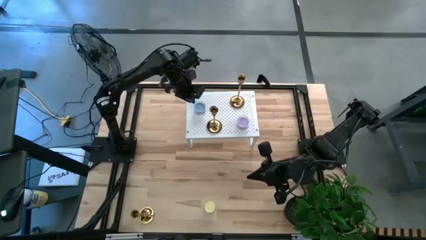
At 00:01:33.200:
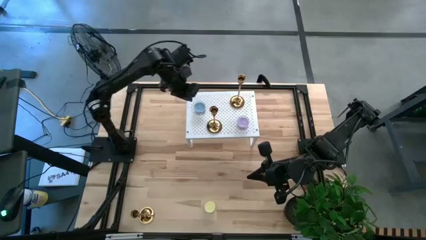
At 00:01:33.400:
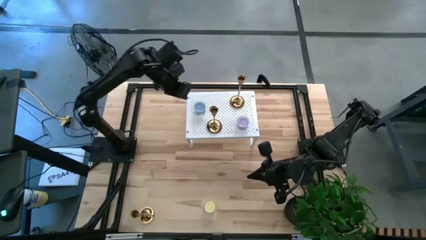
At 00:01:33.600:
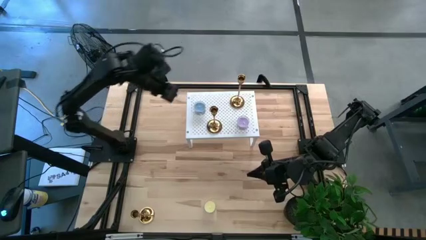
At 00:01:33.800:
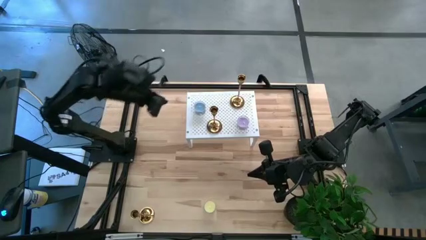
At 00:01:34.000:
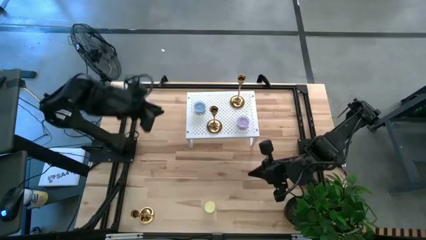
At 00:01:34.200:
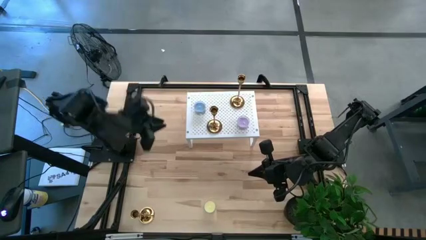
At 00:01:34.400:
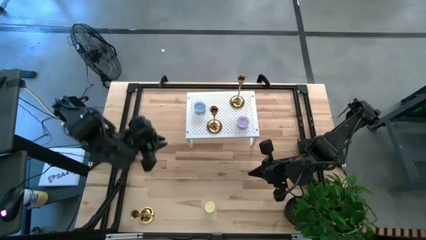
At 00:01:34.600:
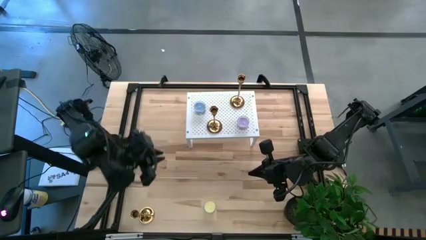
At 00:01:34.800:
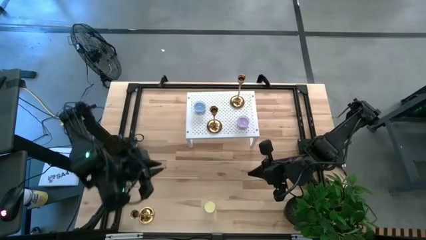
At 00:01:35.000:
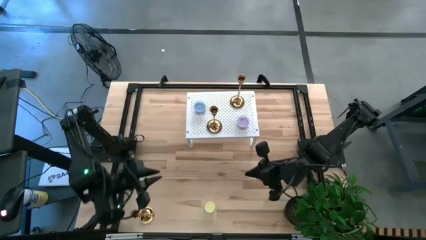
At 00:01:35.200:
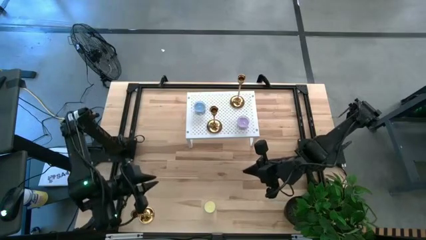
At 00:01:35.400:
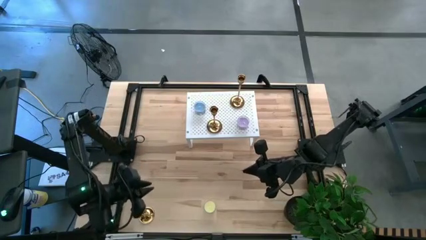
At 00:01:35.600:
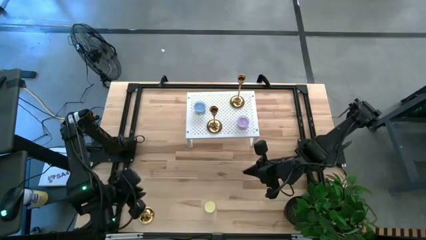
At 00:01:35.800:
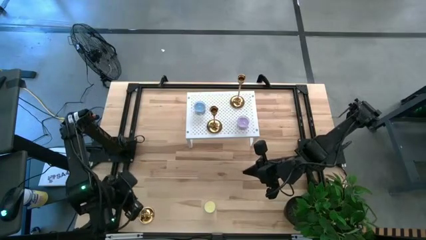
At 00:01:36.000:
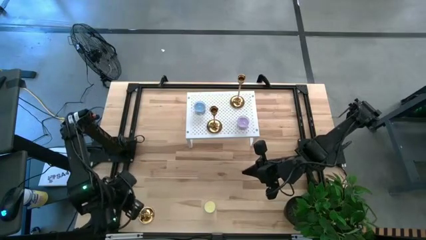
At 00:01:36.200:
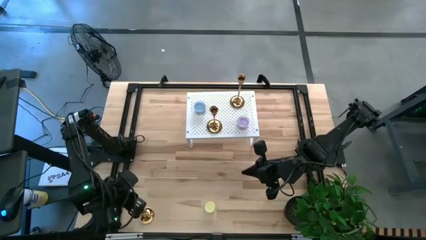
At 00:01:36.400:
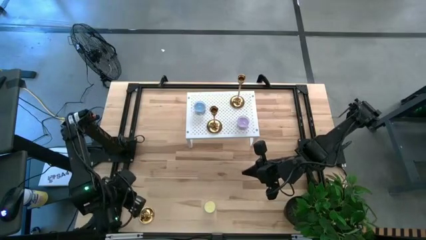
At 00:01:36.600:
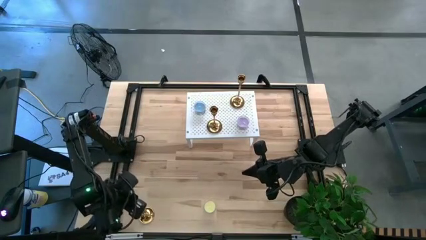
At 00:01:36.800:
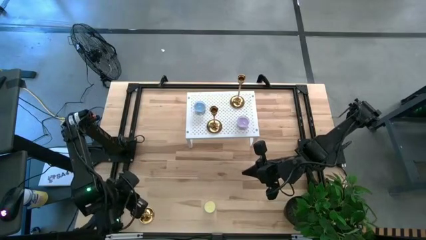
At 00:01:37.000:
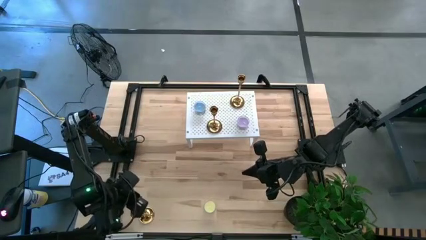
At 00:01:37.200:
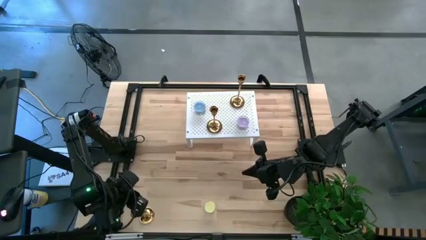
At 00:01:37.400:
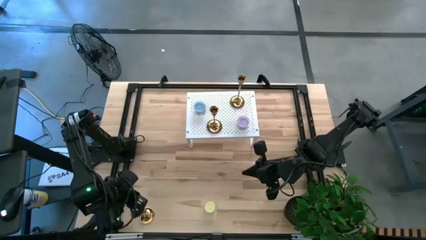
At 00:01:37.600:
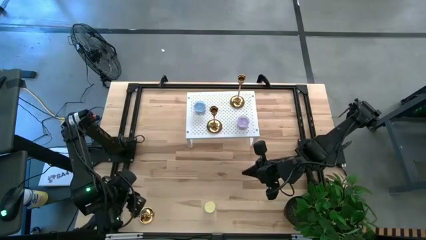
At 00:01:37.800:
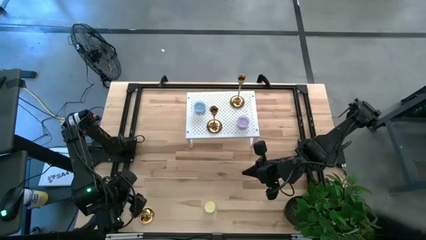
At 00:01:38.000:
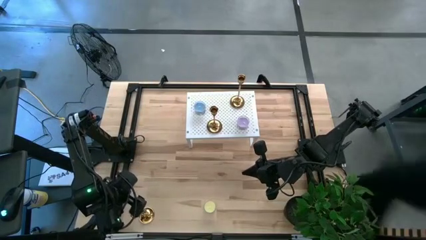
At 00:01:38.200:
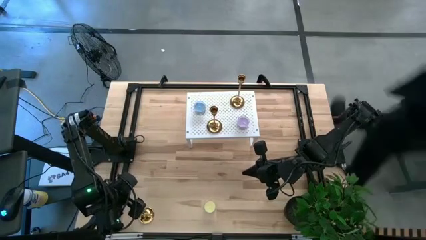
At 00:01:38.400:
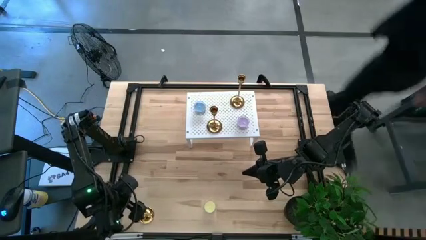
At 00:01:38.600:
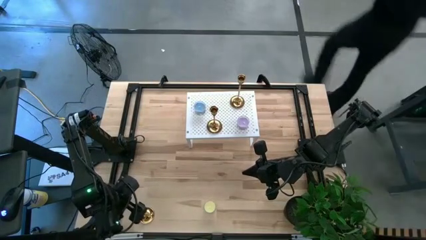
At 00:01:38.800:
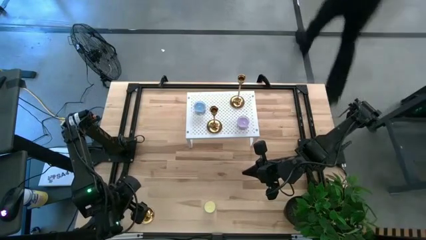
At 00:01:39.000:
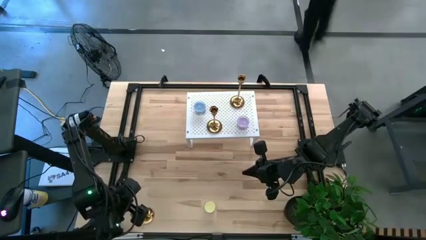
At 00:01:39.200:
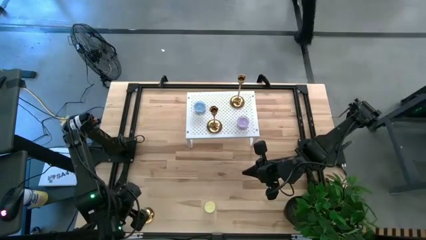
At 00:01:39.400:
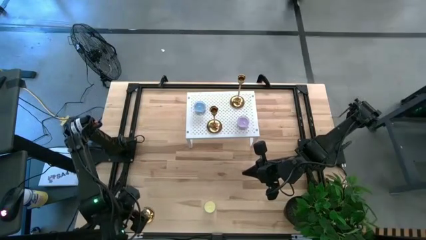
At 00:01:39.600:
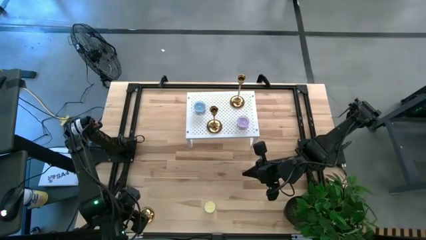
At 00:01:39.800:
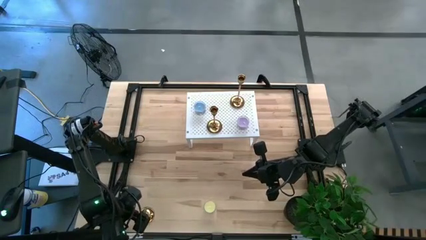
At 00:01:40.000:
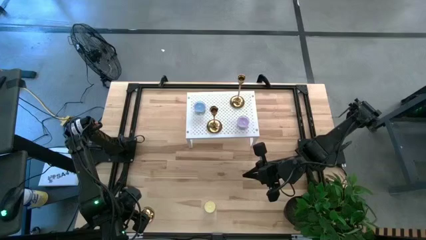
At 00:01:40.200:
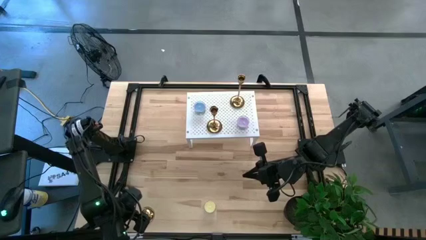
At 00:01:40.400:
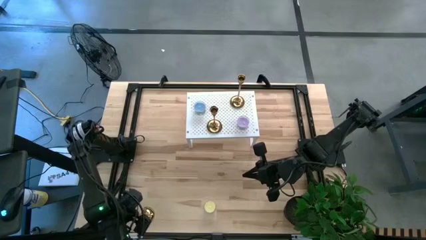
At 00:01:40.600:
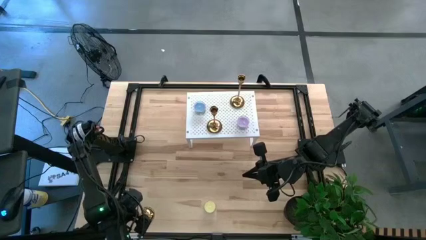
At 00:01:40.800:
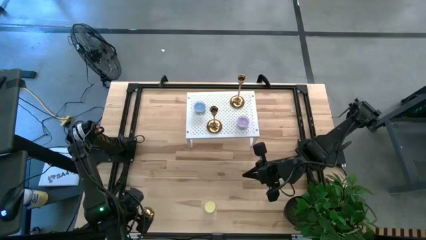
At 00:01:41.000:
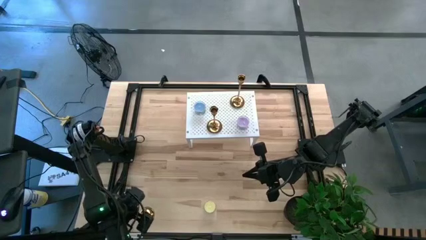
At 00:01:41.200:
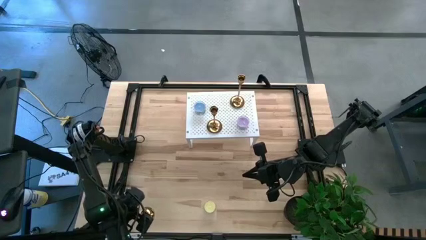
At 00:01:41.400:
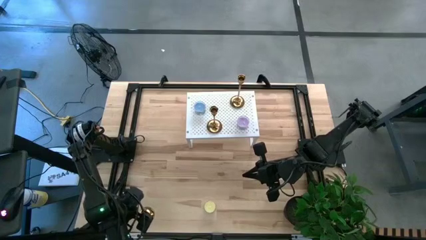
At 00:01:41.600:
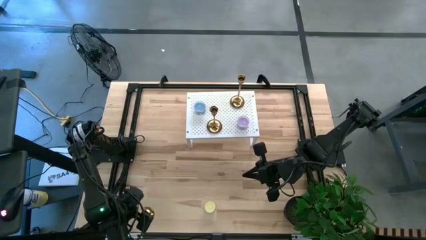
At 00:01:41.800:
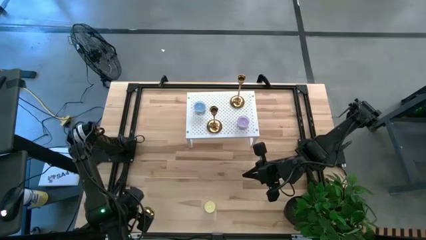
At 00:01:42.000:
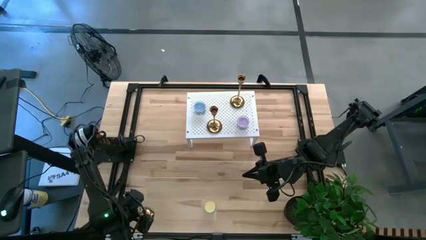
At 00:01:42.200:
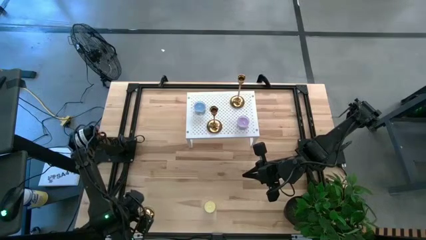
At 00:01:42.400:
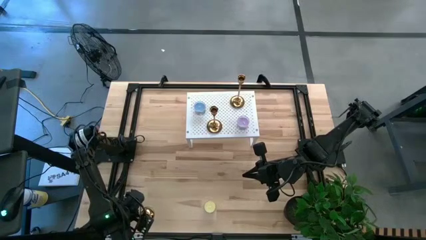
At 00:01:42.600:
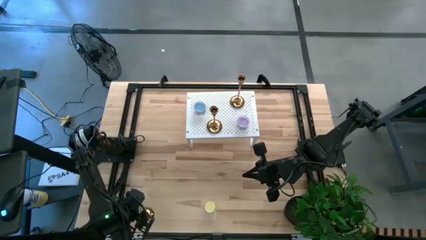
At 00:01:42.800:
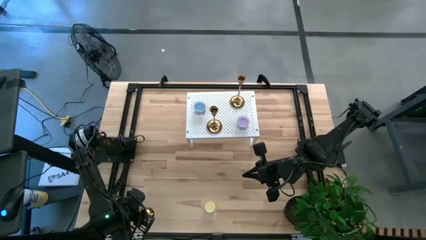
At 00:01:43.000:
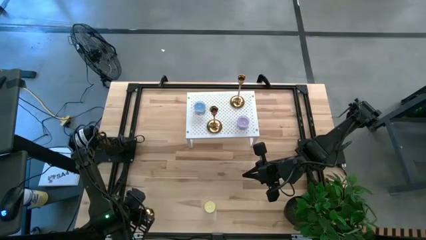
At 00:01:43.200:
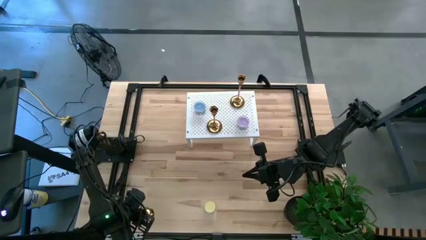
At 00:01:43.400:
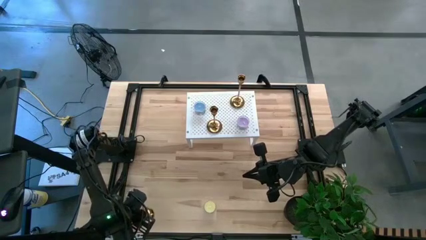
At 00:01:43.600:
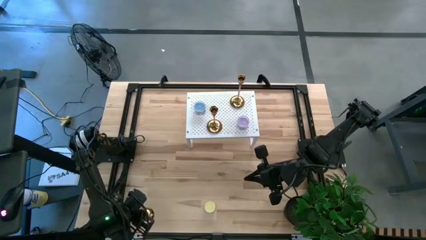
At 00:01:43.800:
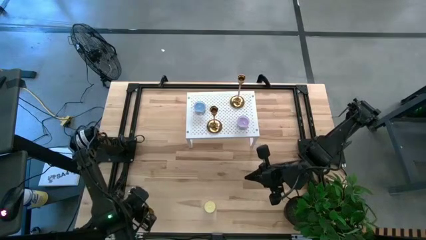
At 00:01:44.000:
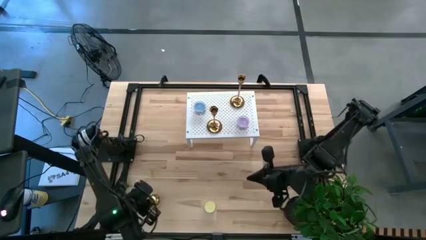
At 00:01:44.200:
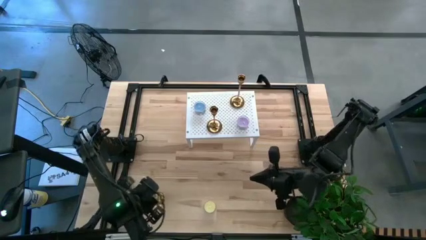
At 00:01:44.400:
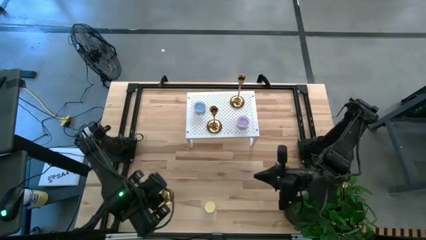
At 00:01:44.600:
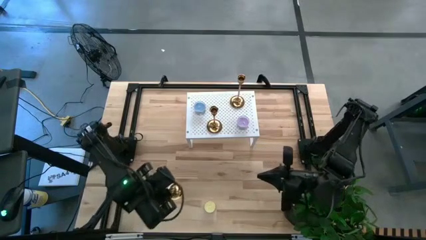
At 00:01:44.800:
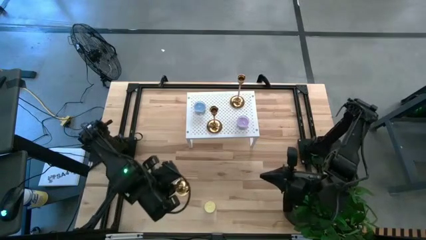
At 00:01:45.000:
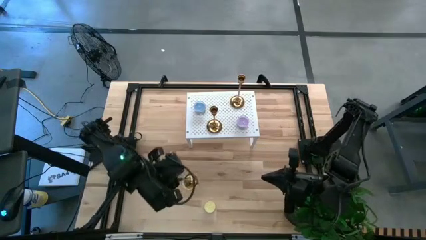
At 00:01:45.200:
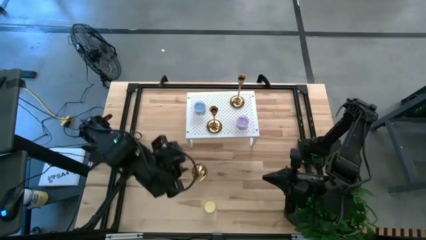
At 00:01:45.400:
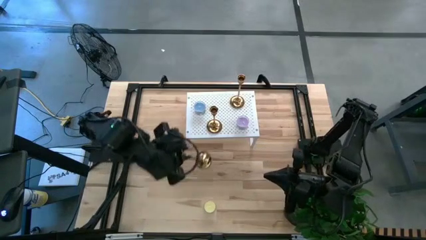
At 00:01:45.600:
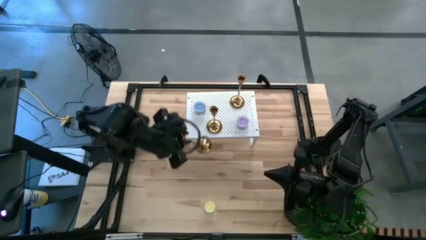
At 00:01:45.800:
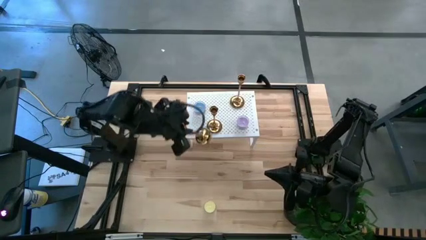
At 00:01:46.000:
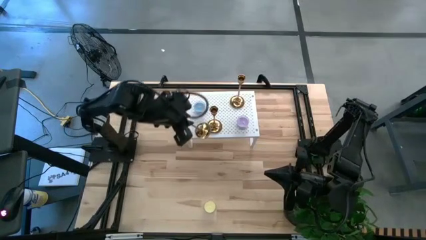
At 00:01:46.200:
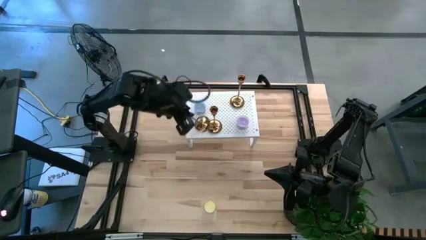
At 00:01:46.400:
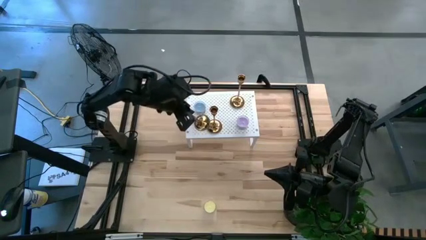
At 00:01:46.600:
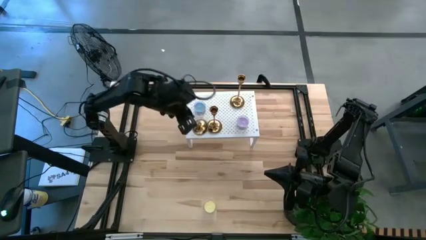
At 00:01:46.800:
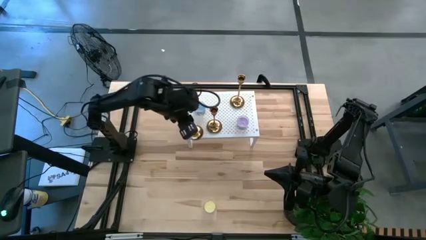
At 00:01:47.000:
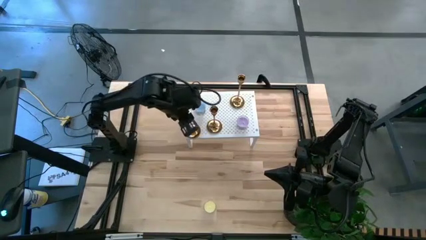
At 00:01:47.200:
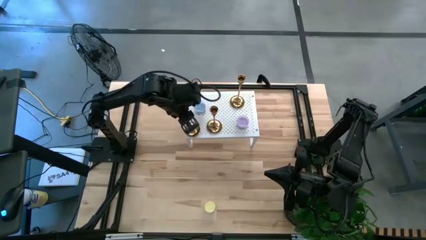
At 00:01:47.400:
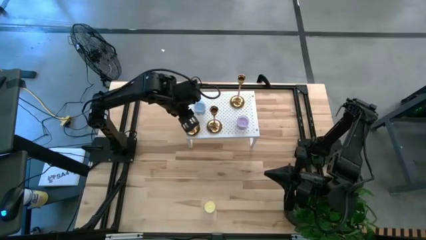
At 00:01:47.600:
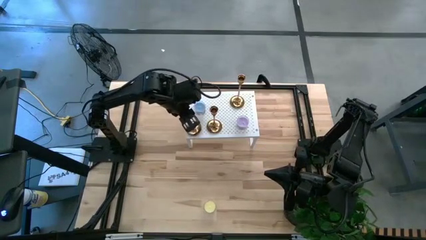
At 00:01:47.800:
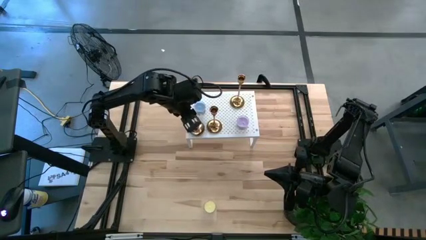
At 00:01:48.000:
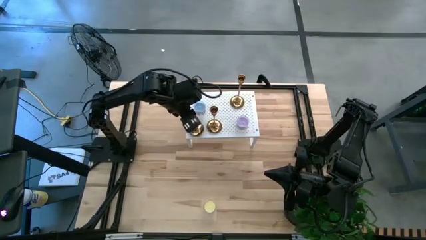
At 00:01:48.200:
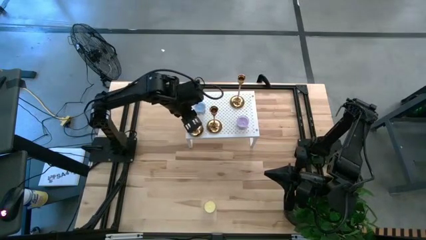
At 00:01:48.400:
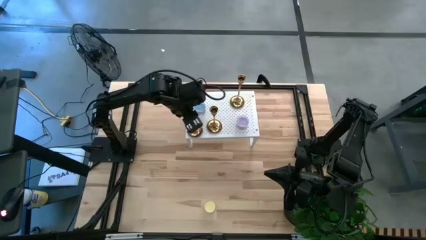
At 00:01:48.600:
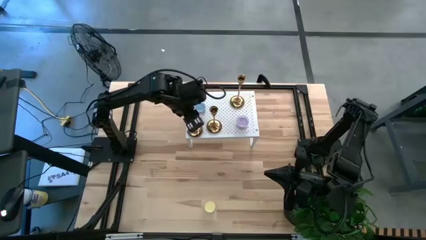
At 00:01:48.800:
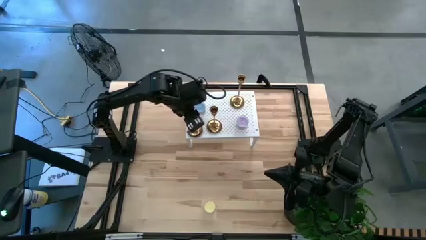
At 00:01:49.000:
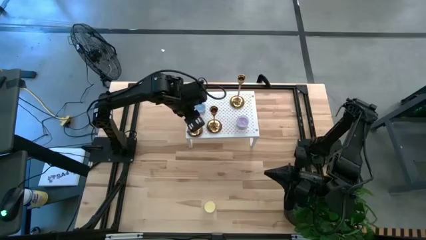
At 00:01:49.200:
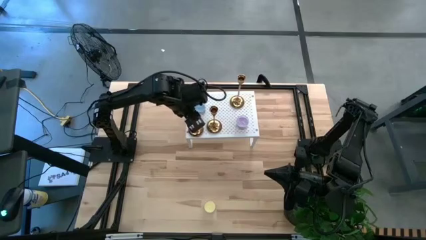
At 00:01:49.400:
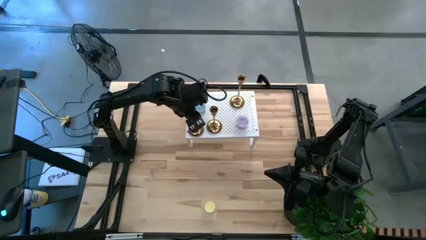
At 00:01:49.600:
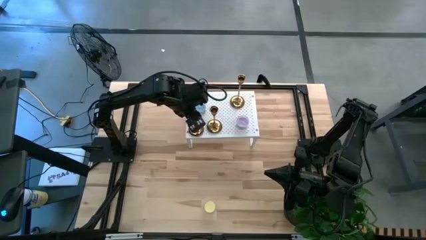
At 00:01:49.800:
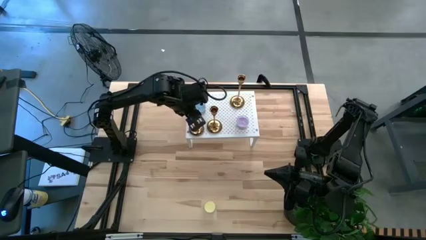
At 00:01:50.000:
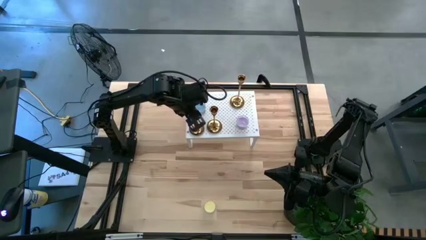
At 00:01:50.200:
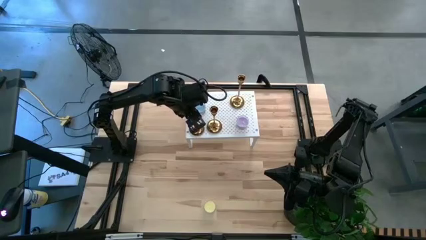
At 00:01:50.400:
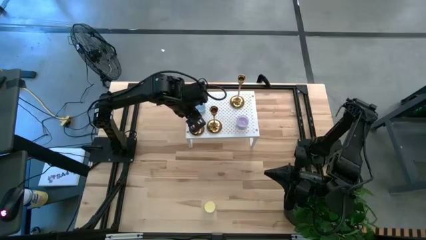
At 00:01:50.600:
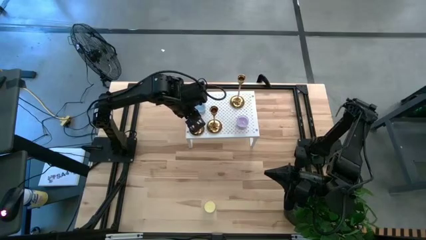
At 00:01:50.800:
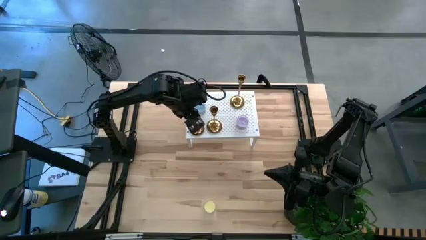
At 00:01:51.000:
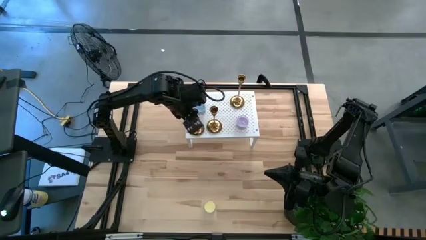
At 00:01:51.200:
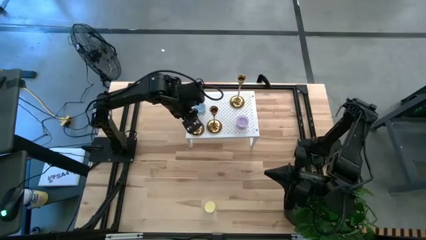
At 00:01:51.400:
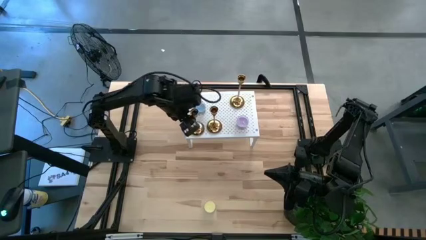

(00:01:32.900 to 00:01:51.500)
Task: Pick & Place candle stick holders
Put the gold candle holder on the shelf
